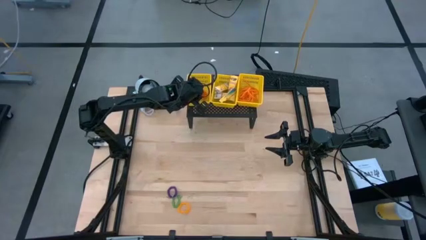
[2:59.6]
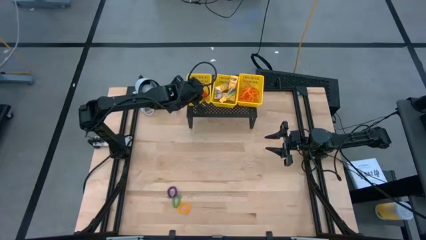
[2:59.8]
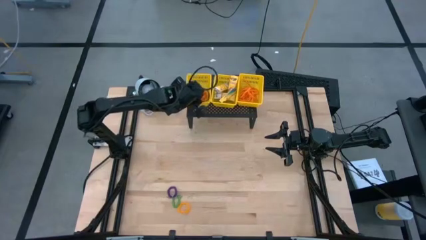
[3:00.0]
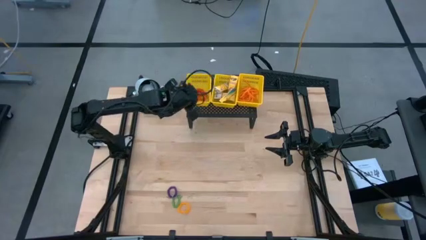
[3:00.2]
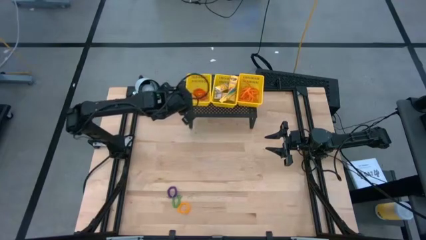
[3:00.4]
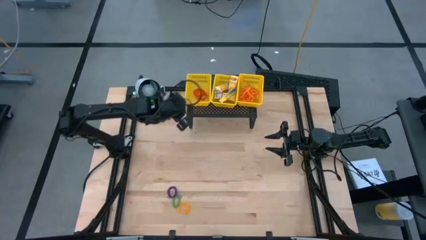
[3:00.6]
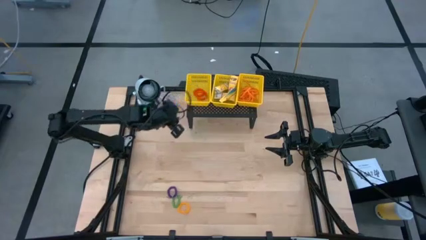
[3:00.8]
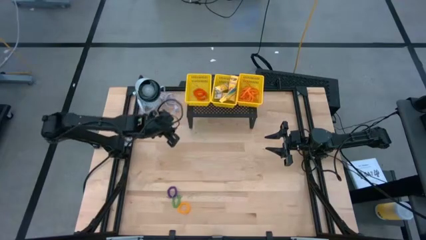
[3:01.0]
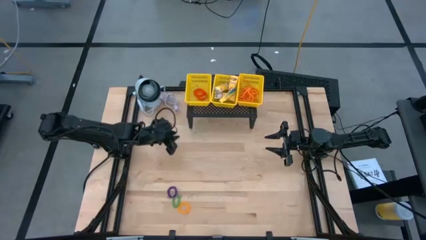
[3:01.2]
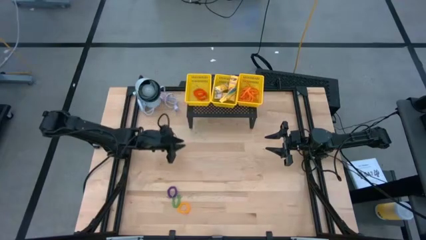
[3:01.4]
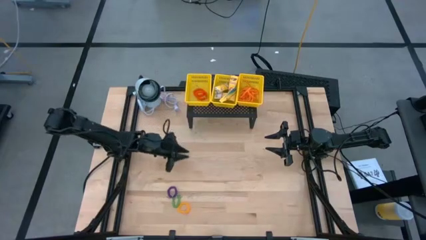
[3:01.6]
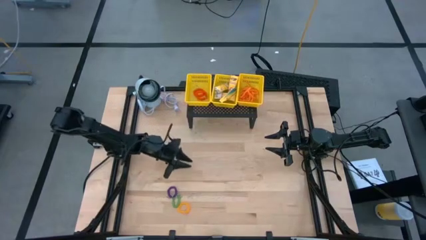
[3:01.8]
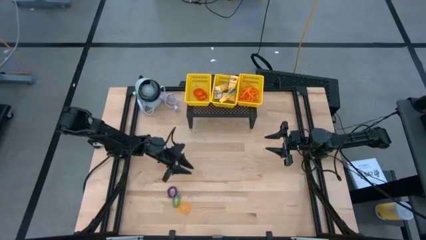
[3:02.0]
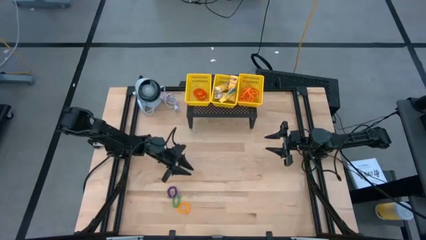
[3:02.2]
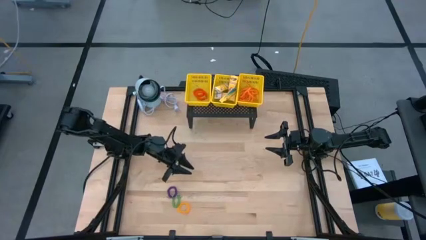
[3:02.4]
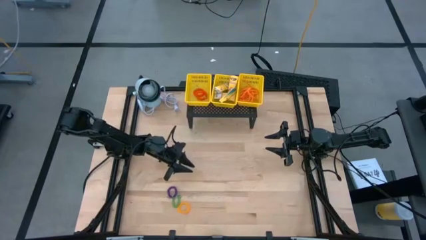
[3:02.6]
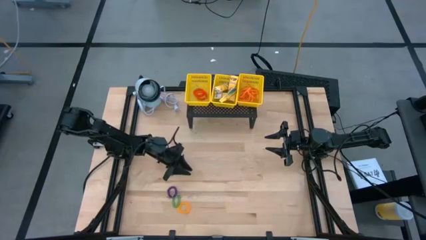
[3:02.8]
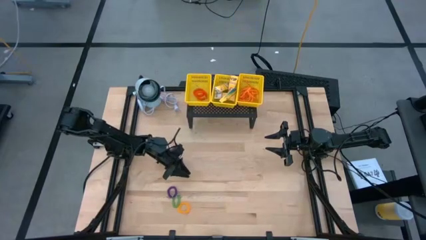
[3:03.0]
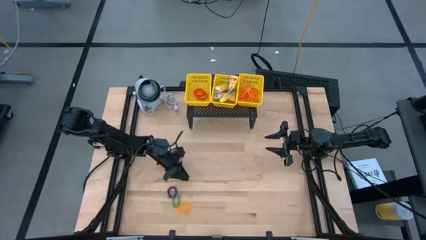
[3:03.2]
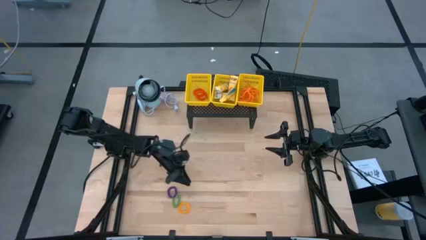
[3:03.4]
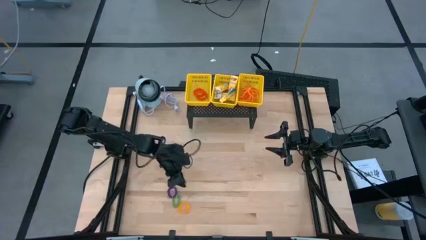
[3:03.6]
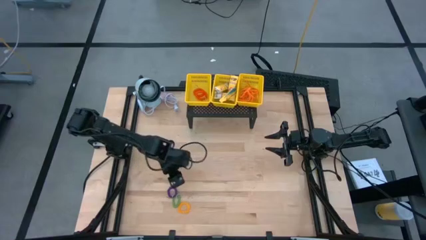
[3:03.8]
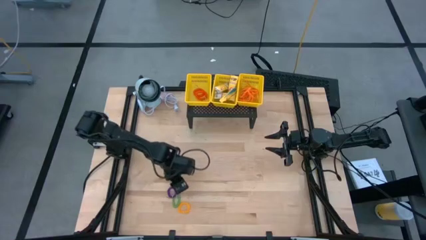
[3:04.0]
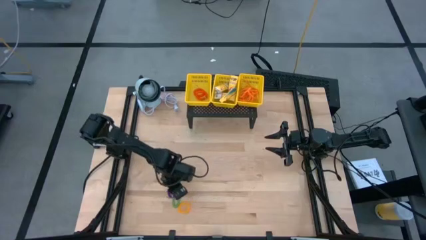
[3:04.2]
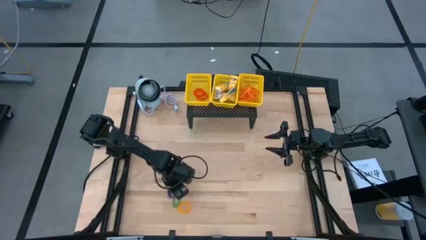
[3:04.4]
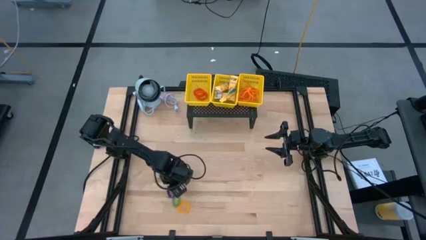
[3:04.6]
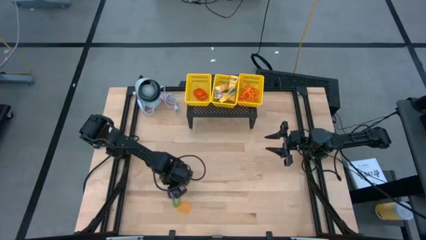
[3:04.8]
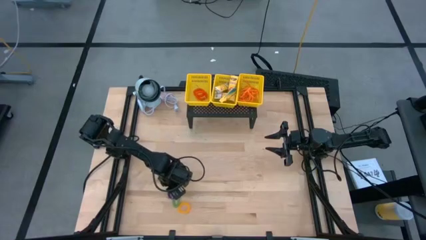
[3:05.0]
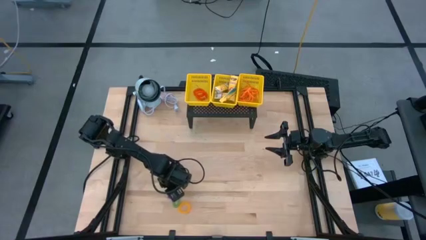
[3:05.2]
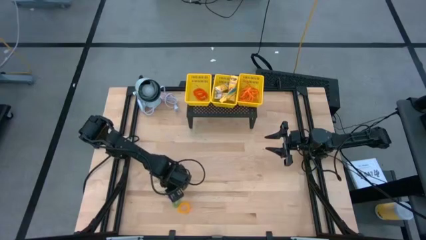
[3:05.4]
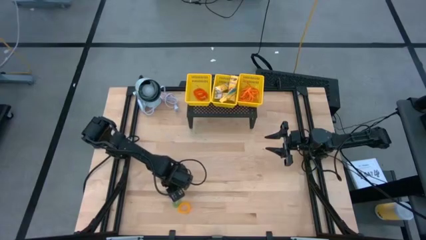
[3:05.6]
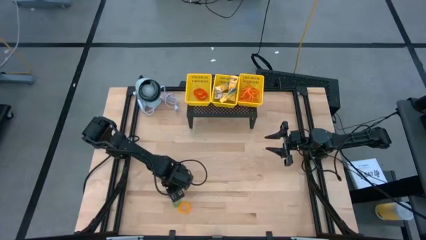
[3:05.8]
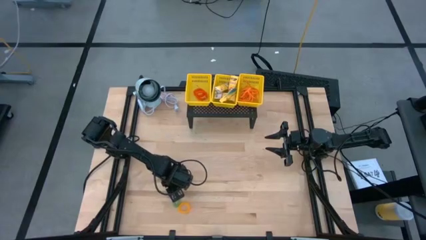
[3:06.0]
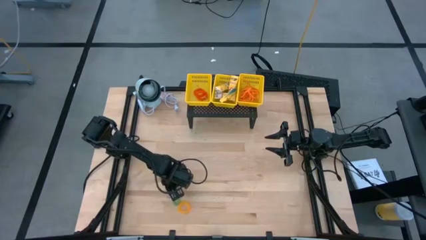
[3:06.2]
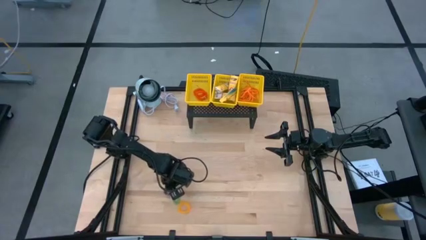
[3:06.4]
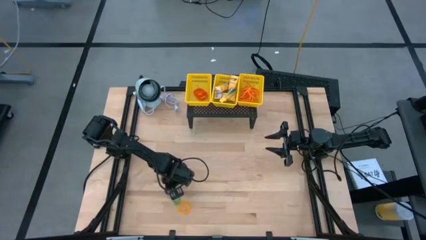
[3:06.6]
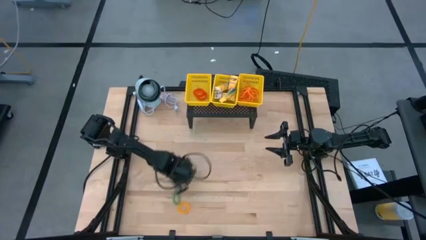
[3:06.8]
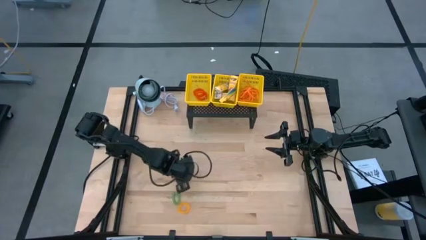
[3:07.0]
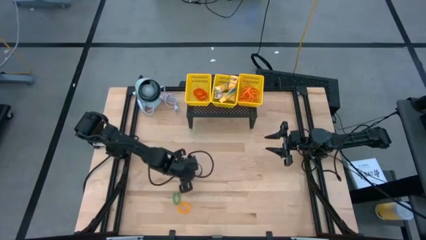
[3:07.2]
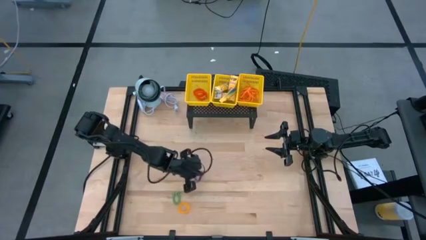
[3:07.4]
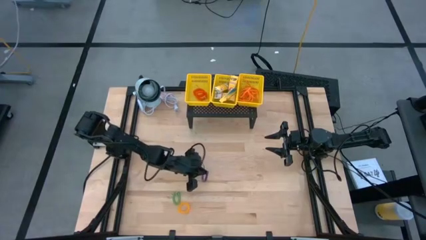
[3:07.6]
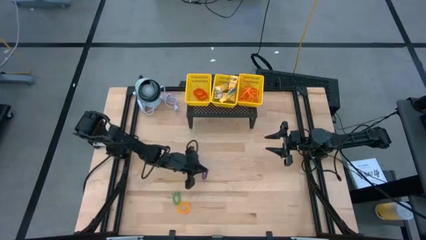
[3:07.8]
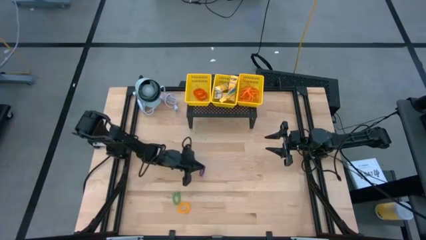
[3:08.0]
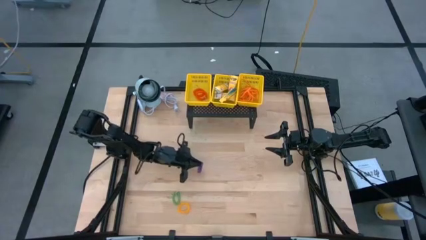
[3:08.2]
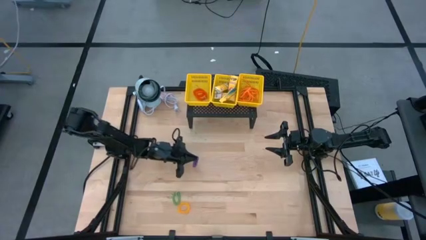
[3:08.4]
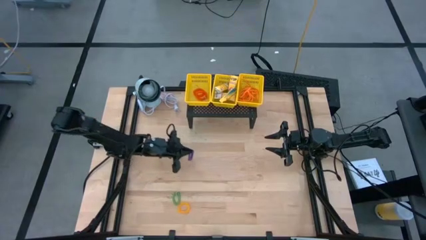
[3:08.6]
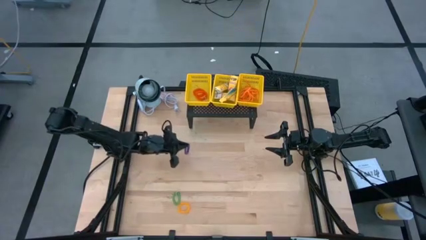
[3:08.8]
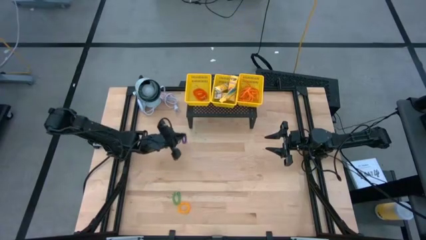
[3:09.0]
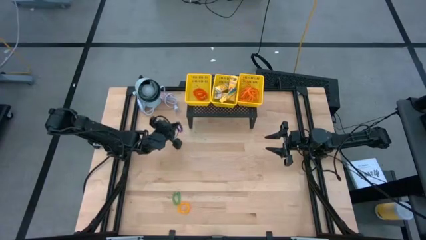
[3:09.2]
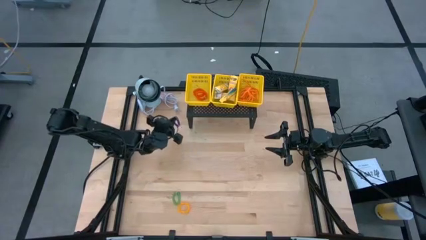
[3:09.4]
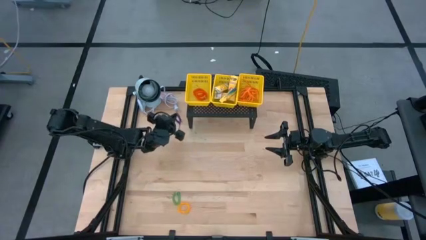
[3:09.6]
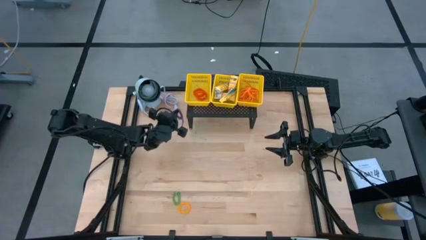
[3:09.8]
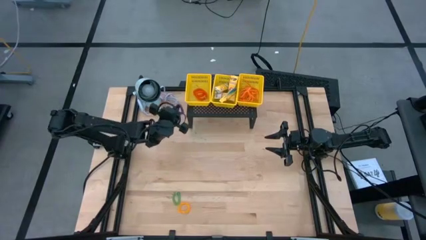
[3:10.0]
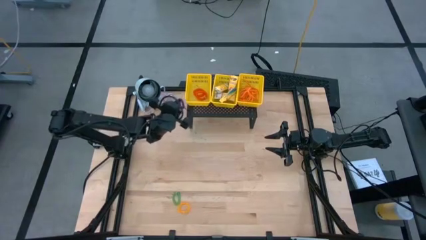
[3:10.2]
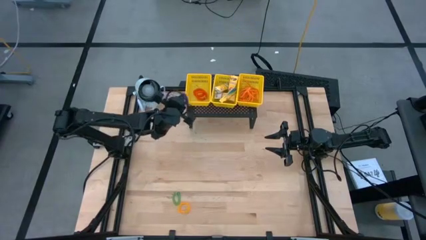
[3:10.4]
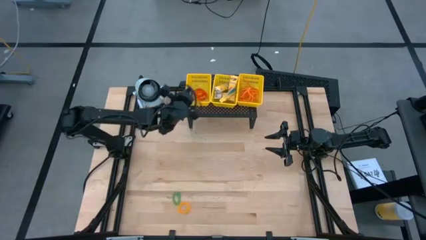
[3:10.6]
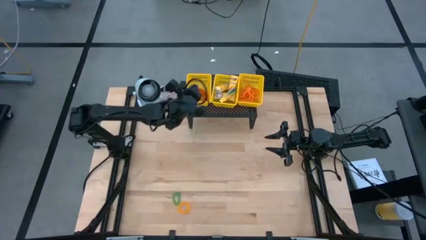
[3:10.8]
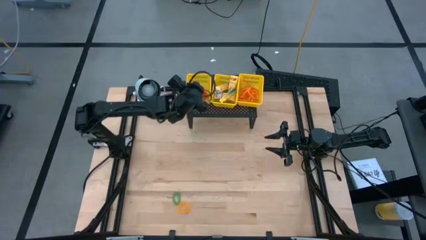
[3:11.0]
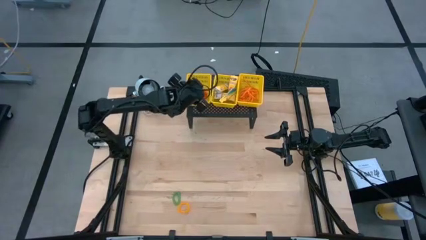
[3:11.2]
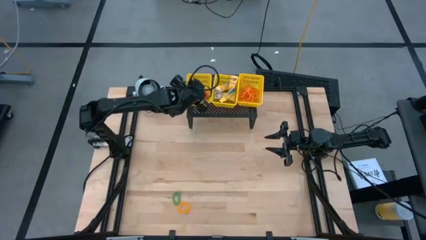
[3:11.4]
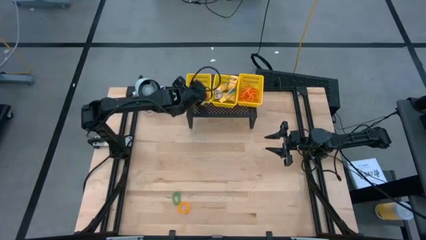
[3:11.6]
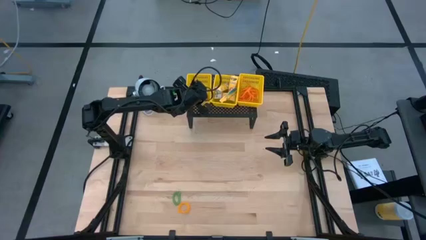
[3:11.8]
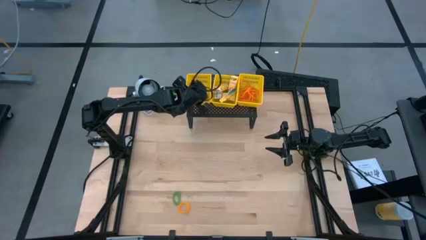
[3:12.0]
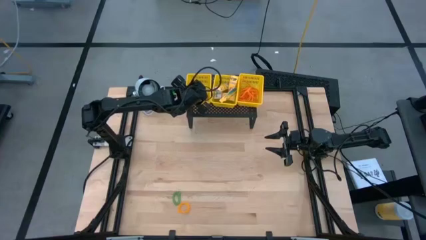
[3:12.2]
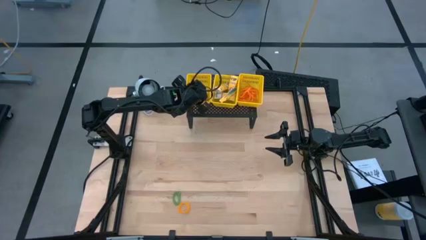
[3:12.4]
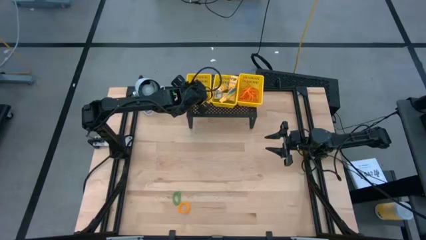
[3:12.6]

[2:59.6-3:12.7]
Task: Pick & Place Office Desk Supplies
Put the violet spring keychain into the left yellow bin on the shelf

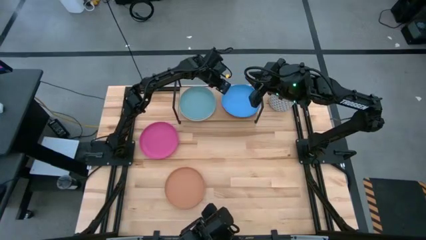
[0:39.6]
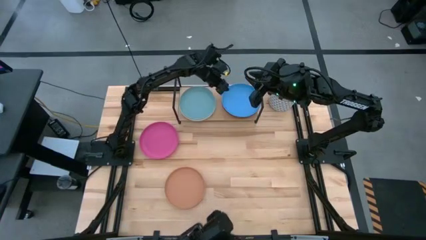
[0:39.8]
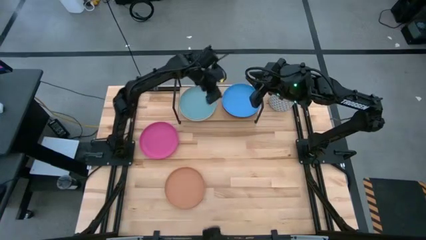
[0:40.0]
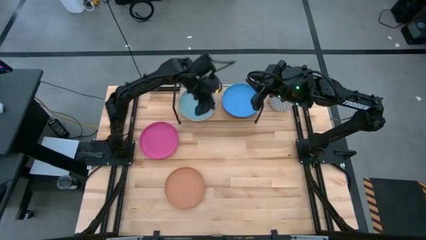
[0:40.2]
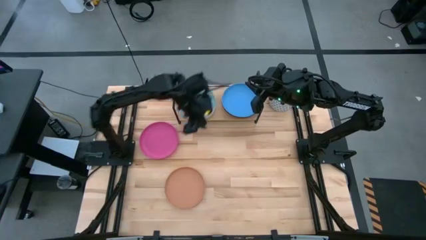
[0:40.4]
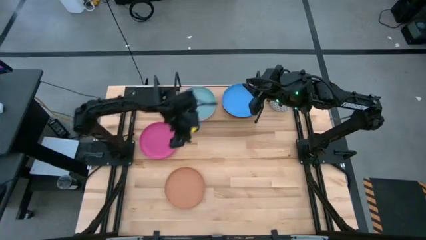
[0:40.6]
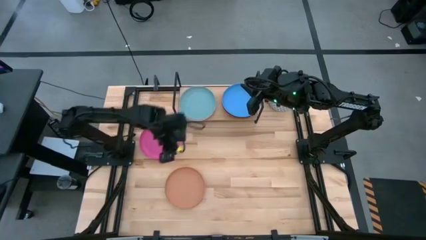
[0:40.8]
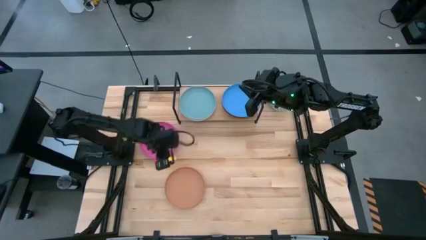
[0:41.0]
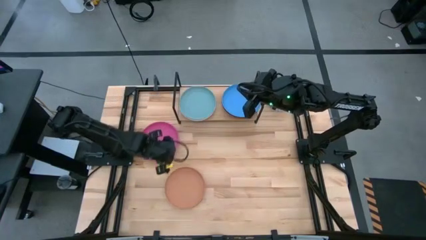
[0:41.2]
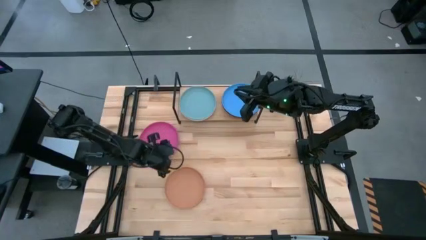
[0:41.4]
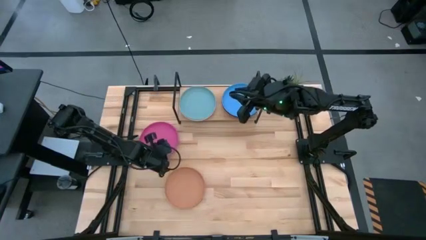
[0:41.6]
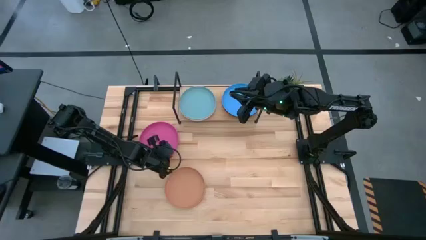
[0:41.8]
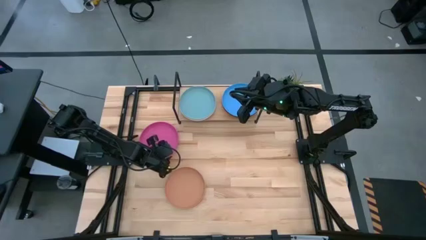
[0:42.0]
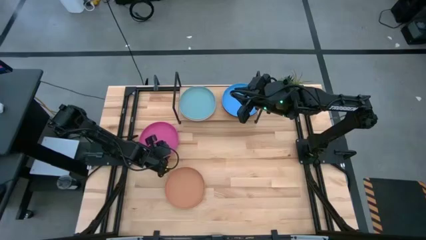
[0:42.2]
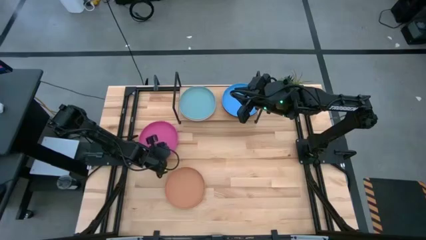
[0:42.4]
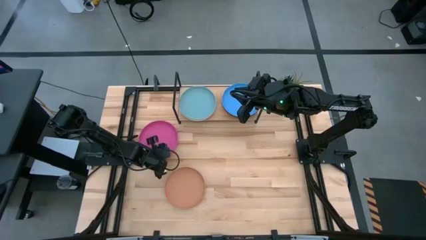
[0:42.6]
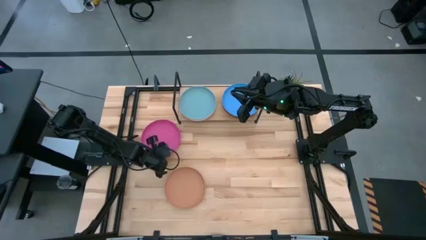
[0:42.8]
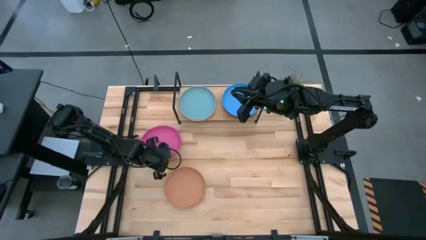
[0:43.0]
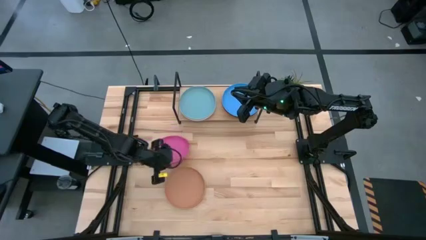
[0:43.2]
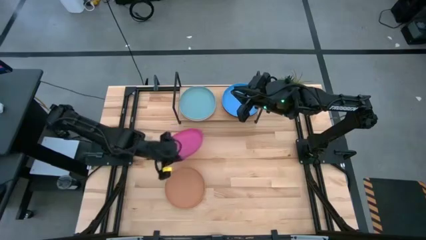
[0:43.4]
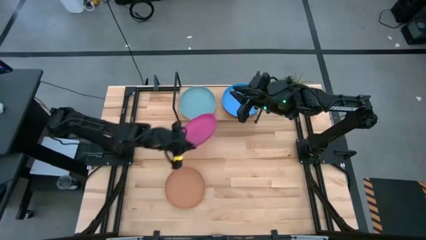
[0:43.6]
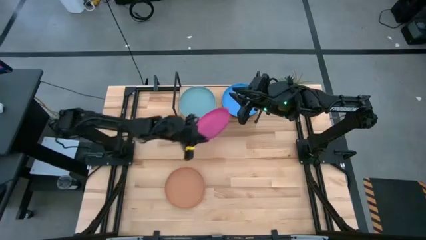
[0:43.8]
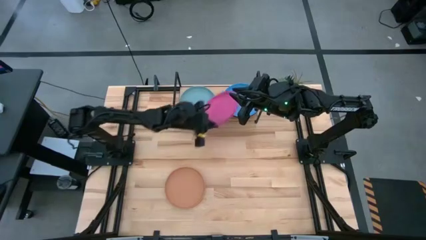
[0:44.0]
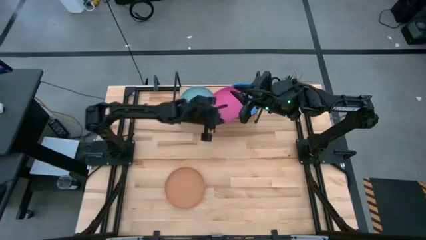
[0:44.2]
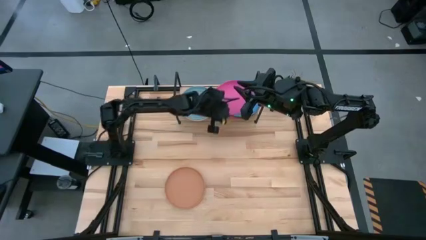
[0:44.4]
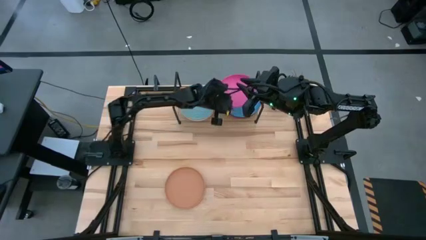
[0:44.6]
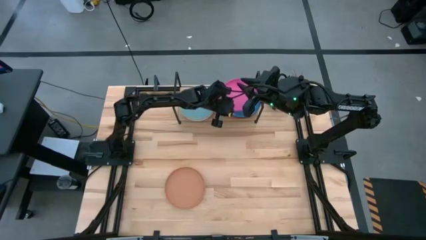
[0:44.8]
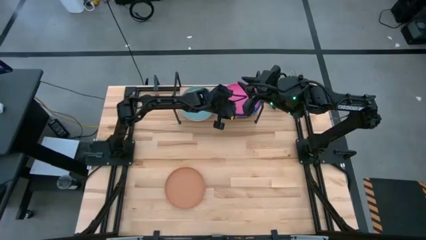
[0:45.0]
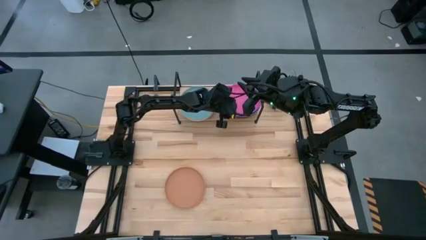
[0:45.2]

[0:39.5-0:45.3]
Task: Place and stack plates onto a shelf
Stack the pink plate on top of the blue plate on on the shelf
